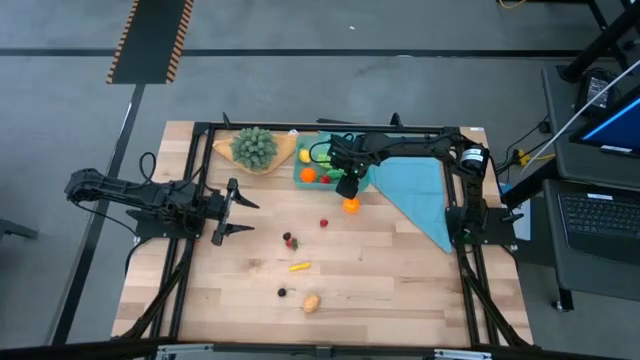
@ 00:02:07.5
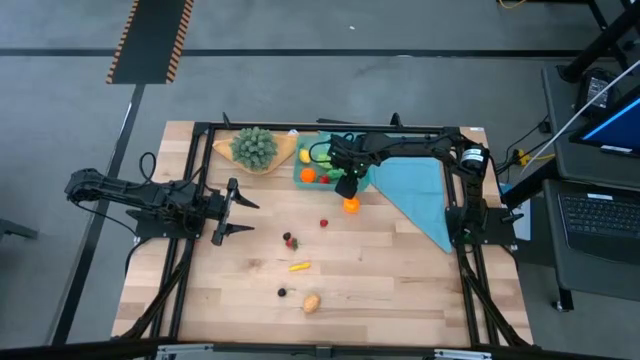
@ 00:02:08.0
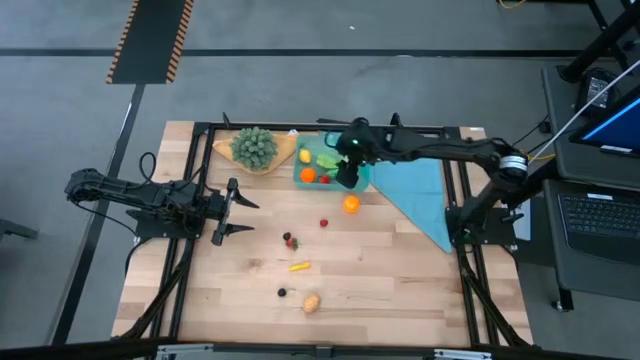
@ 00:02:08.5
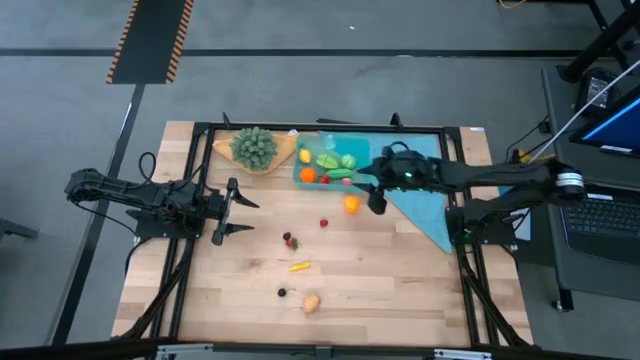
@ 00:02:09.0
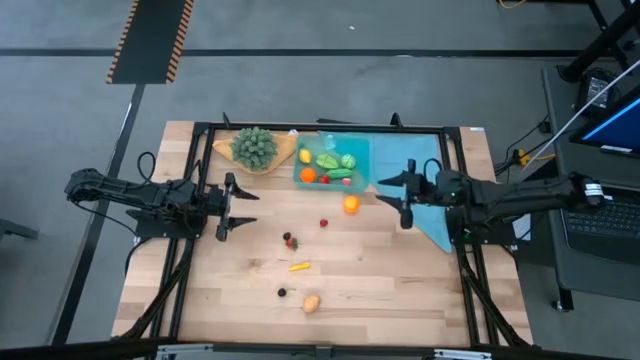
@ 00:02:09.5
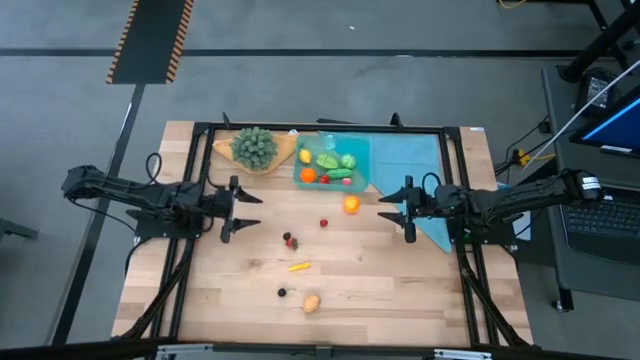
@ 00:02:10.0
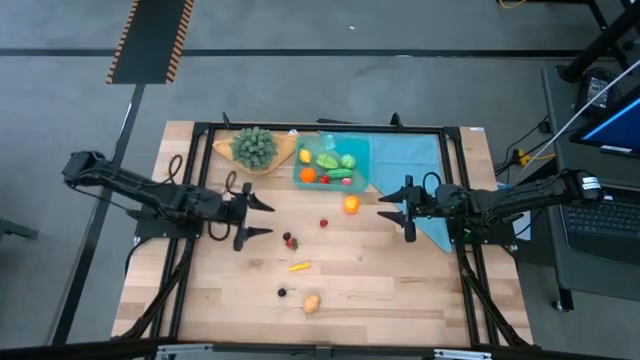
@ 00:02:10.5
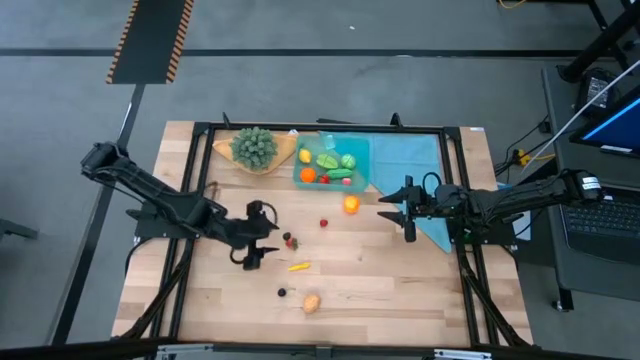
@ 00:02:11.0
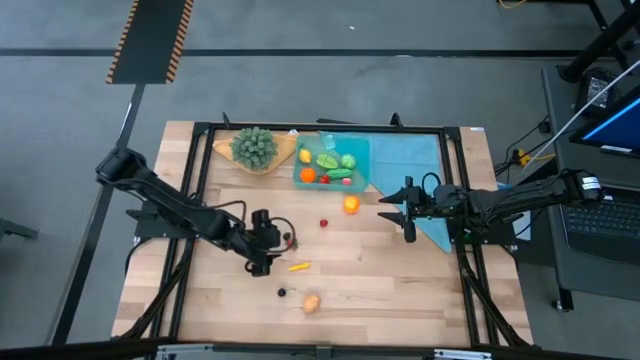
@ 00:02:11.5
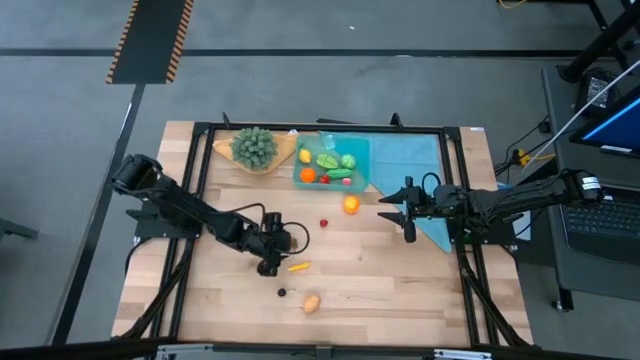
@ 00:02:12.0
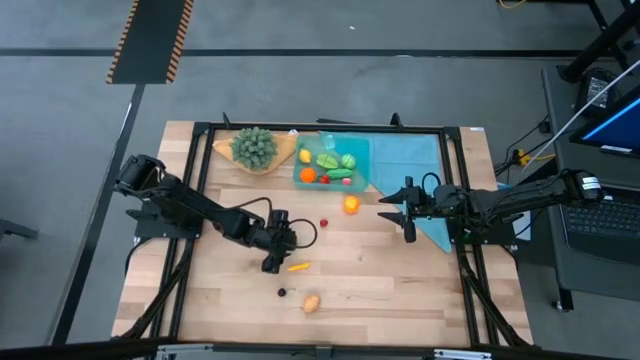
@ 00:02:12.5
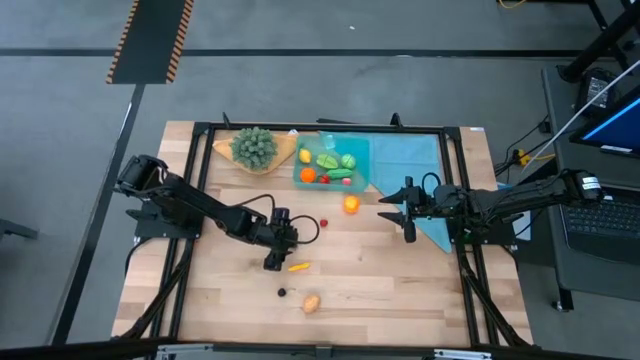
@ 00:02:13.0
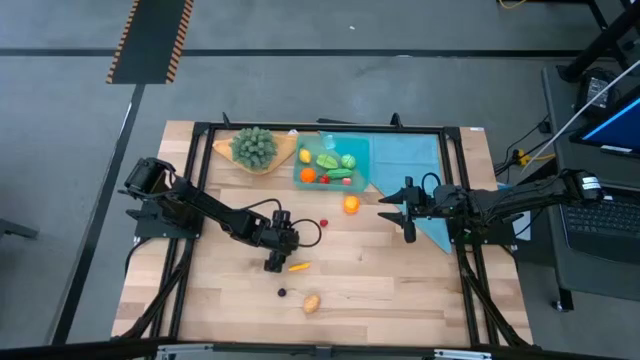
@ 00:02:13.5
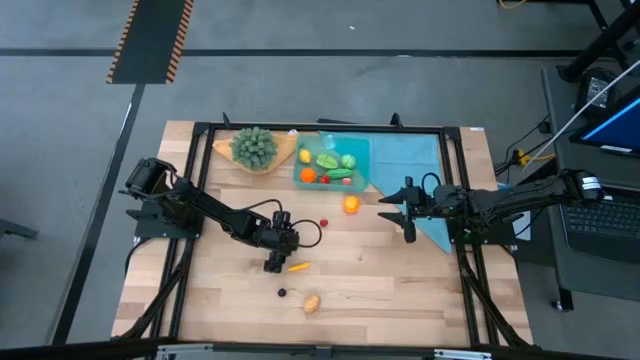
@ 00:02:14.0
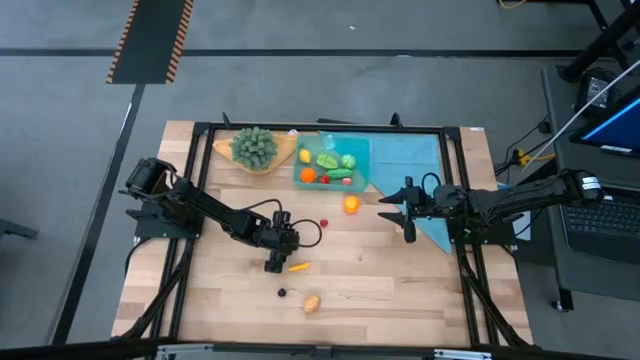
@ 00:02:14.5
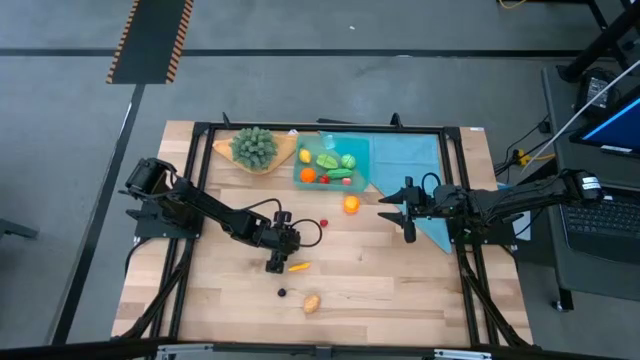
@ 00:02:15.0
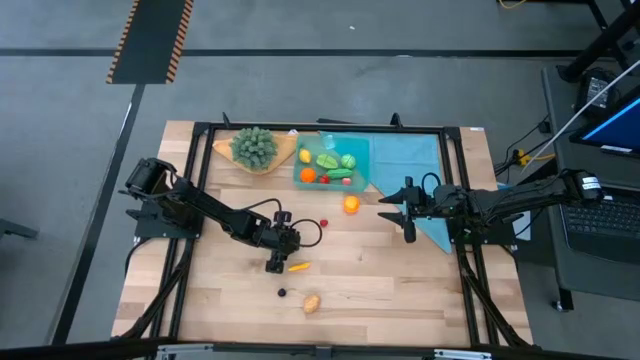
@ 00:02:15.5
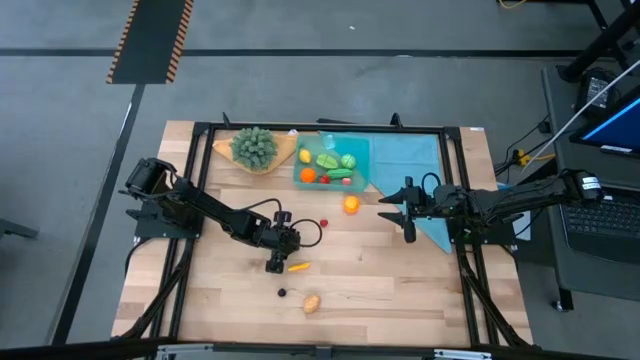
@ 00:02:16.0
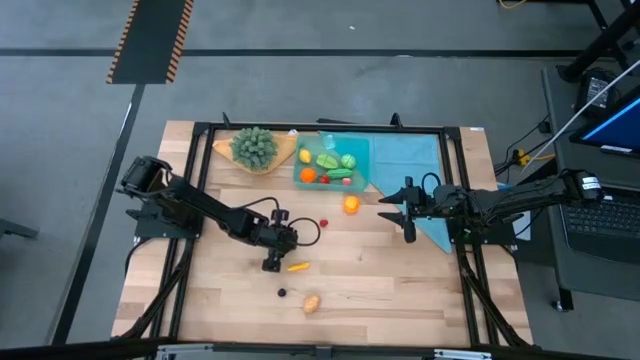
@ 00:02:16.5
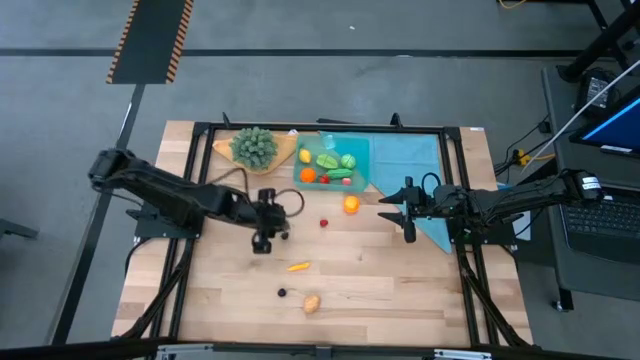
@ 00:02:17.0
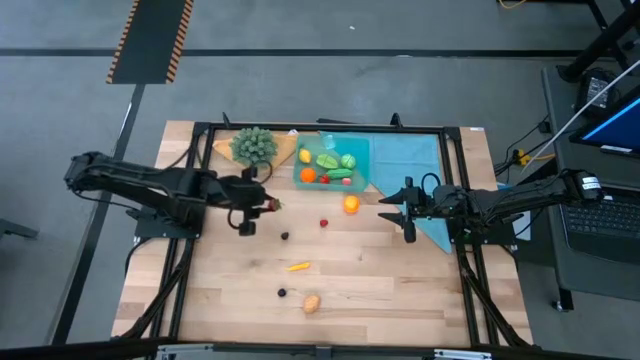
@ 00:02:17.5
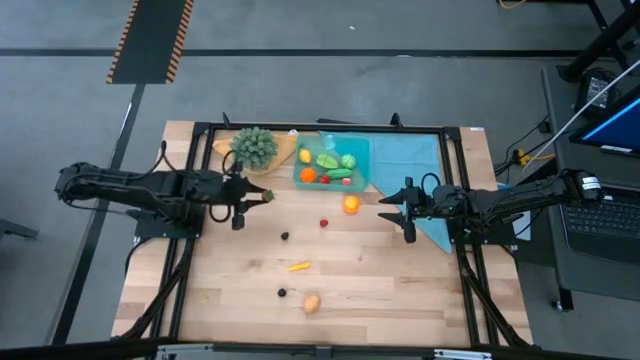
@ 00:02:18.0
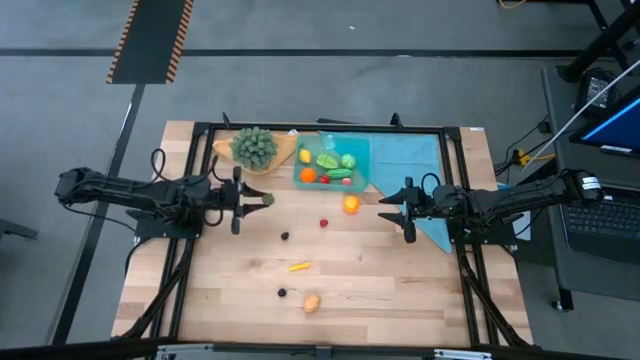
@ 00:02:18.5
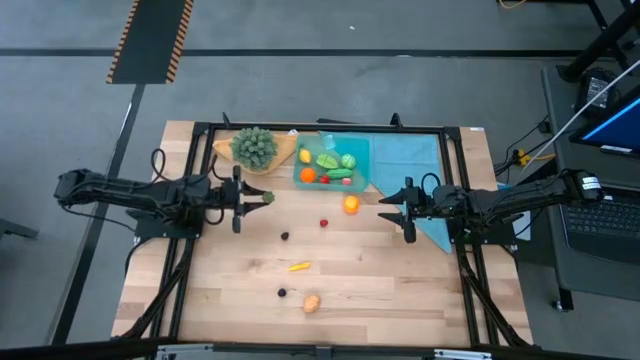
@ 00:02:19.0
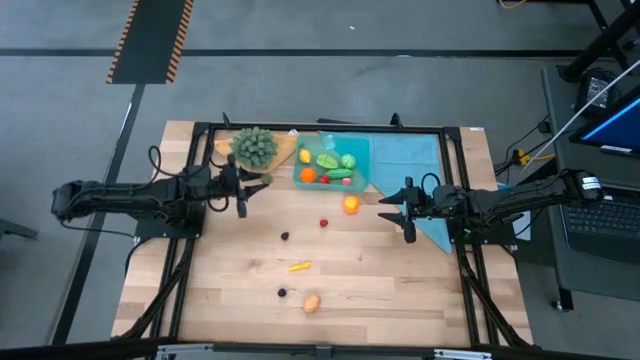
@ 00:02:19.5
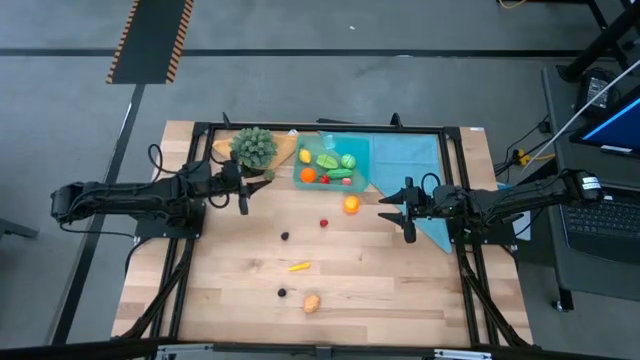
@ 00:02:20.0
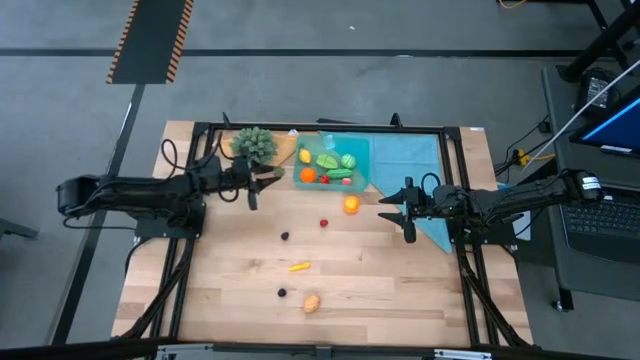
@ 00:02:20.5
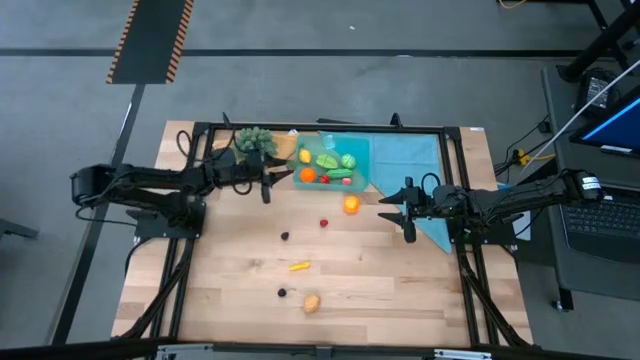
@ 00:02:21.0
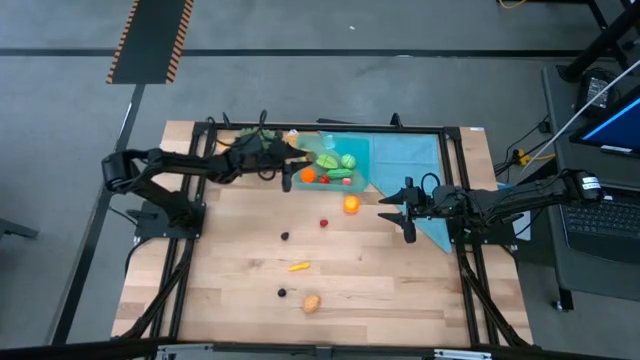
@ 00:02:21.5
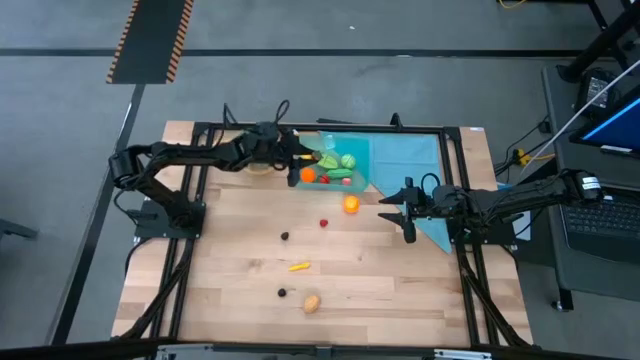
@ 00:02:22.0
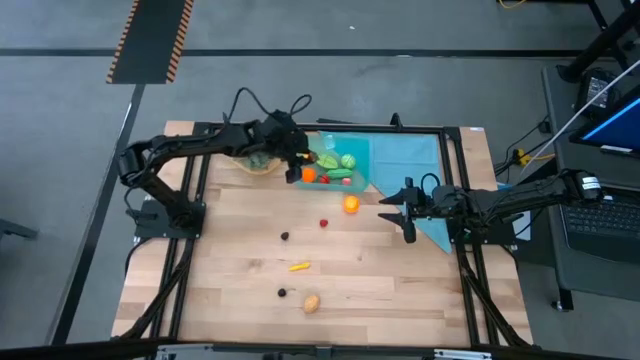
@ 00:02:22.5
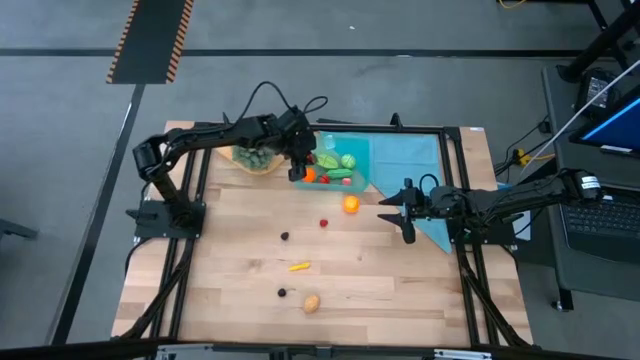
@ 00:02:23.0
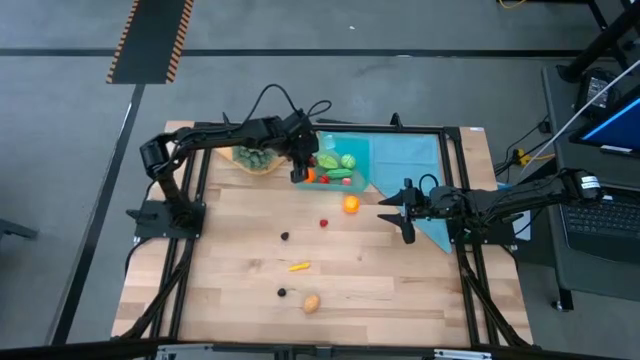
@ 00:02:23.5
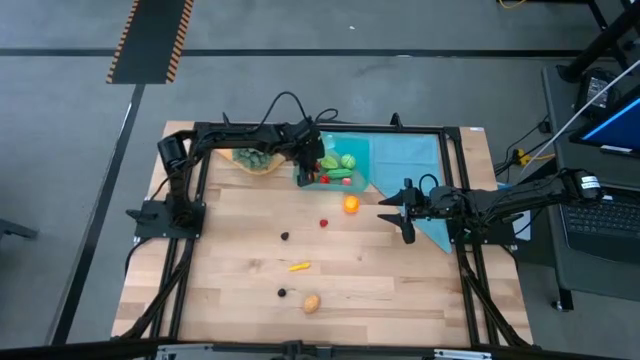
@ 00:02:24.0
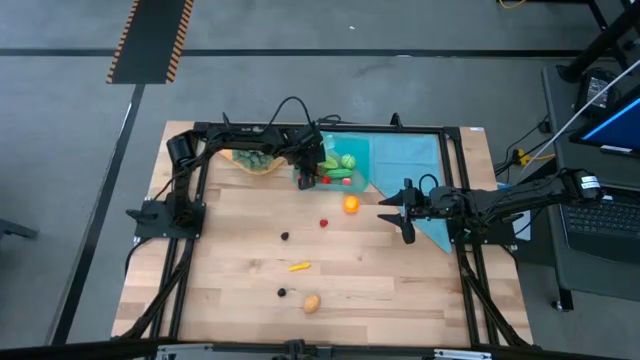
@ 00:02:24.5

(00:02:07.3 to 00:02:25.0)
Task: Pick and placing Produce into tupperware
Put the strawberry into the blue bin
